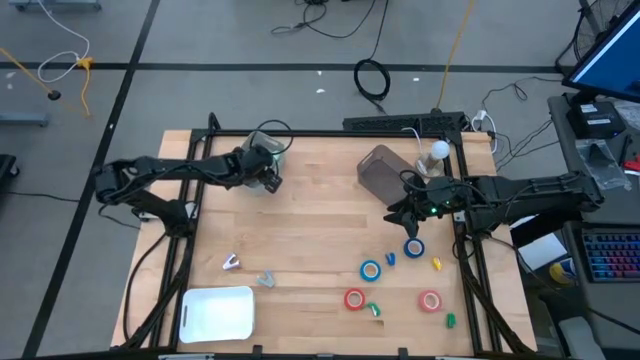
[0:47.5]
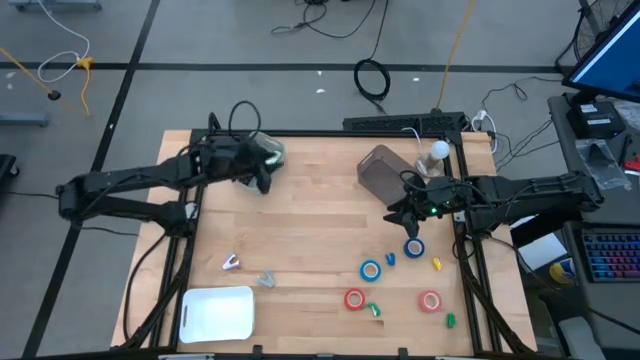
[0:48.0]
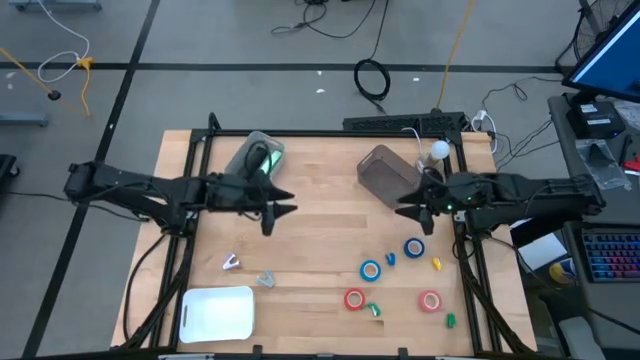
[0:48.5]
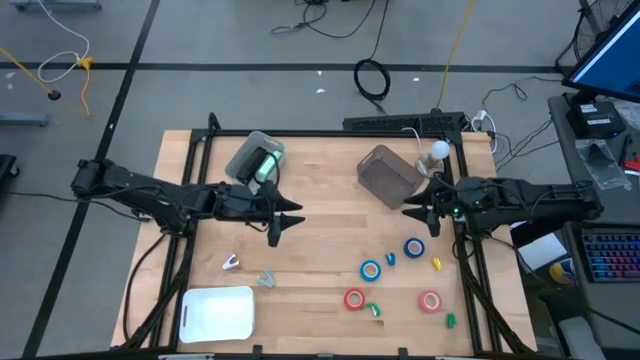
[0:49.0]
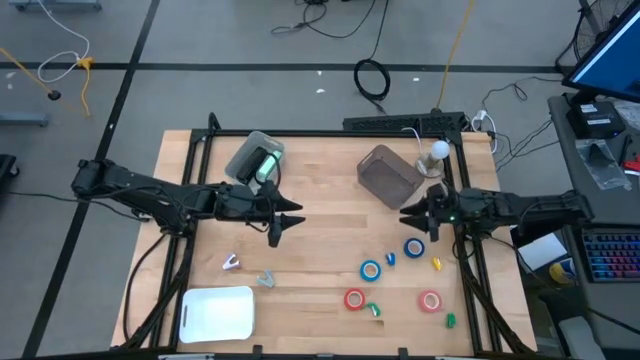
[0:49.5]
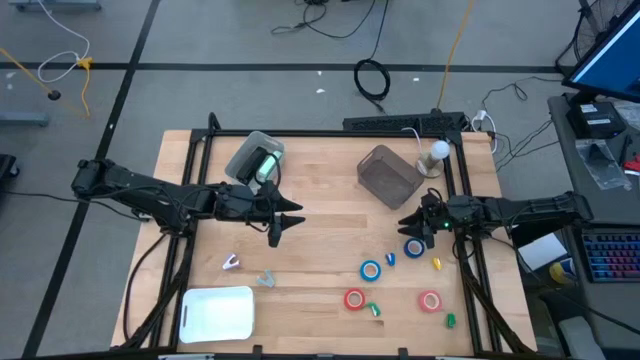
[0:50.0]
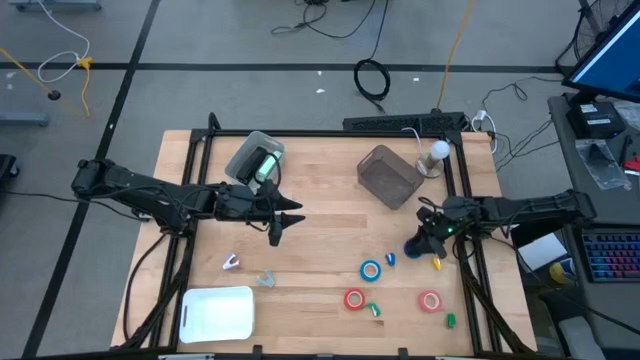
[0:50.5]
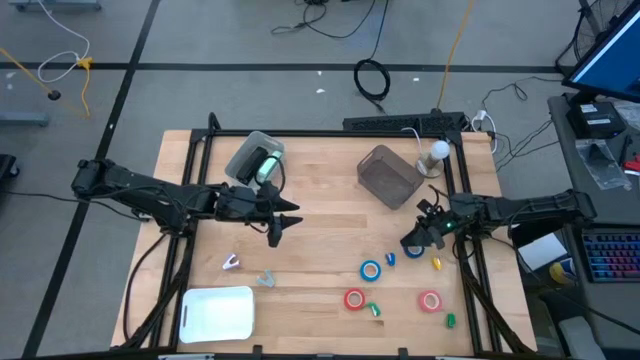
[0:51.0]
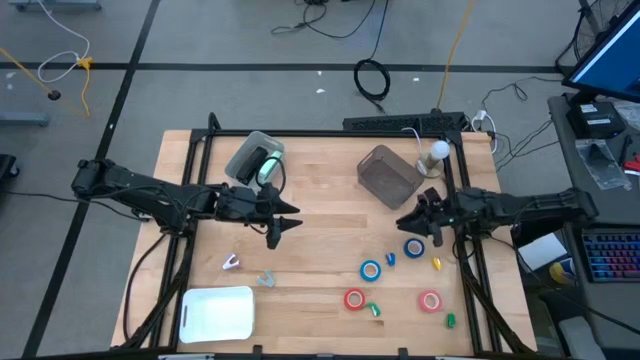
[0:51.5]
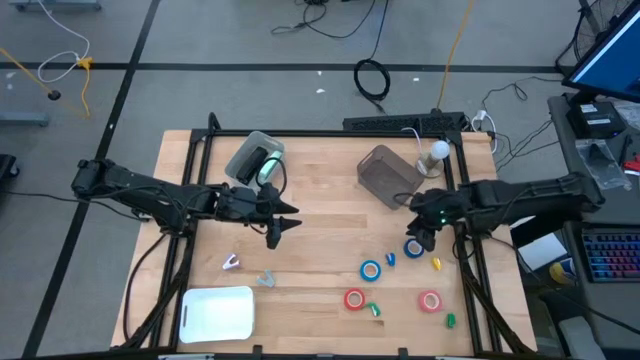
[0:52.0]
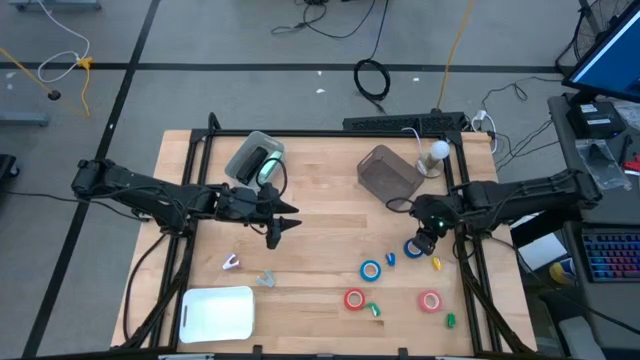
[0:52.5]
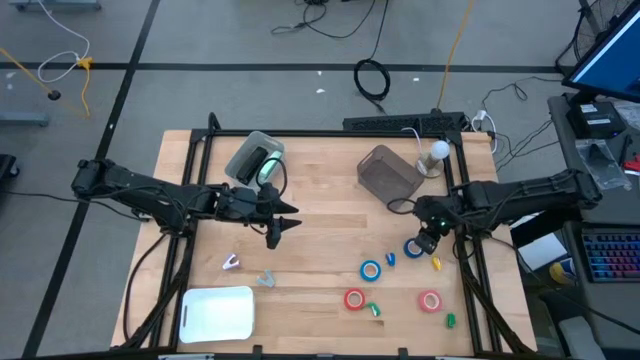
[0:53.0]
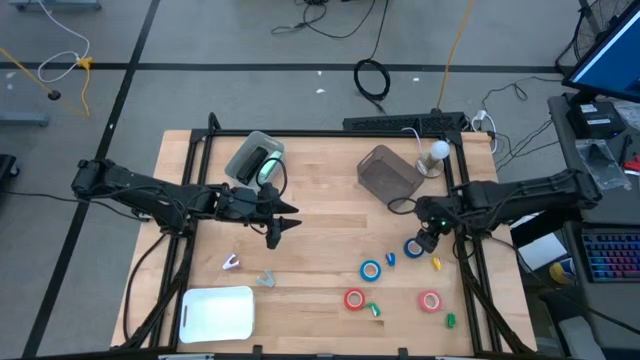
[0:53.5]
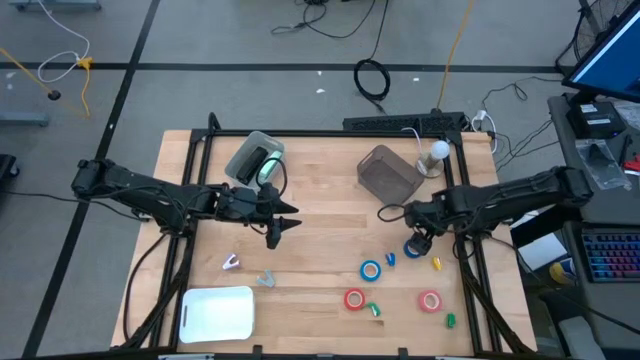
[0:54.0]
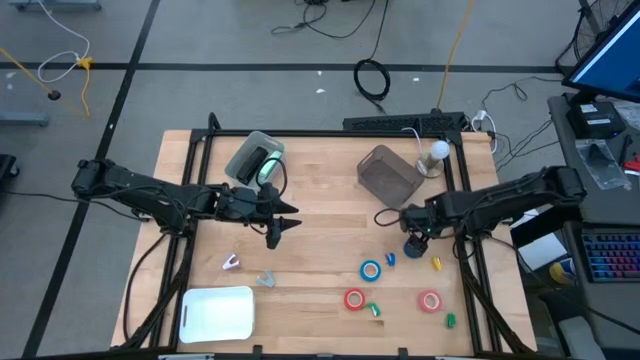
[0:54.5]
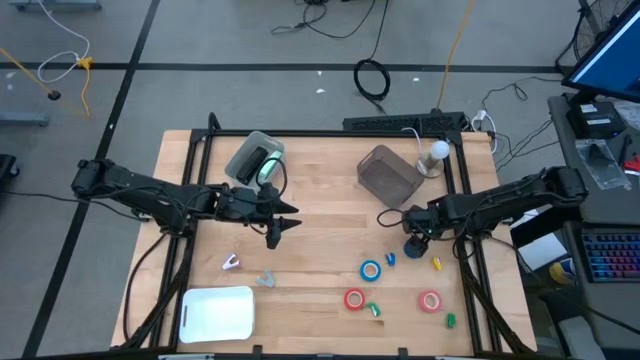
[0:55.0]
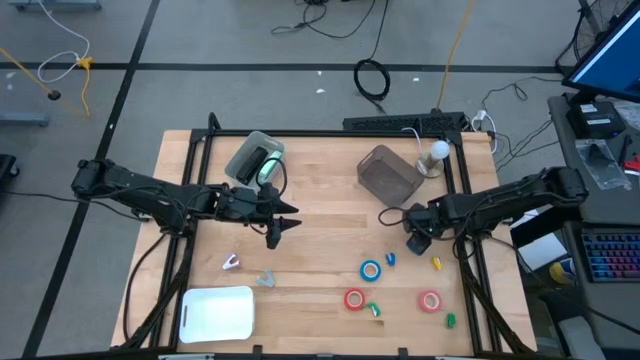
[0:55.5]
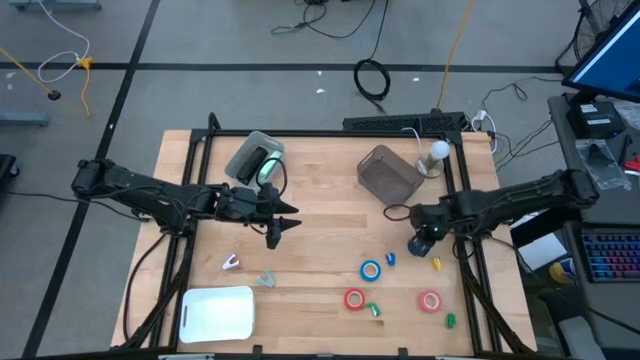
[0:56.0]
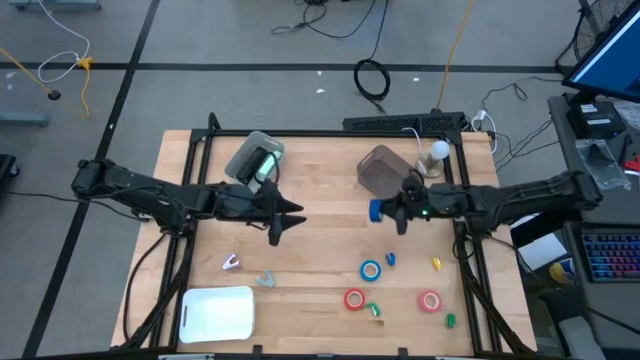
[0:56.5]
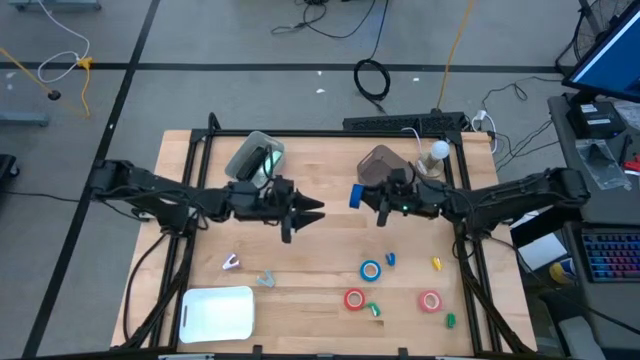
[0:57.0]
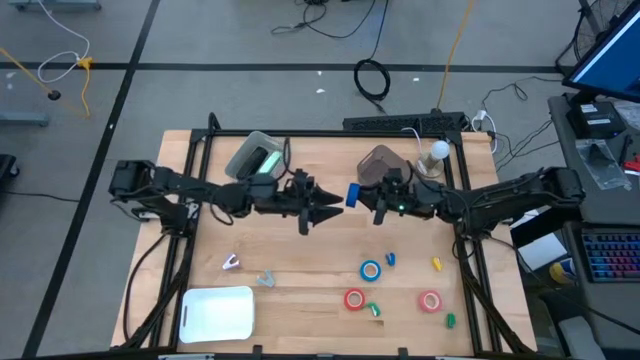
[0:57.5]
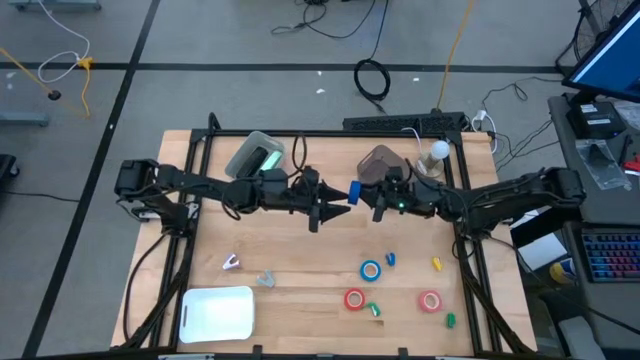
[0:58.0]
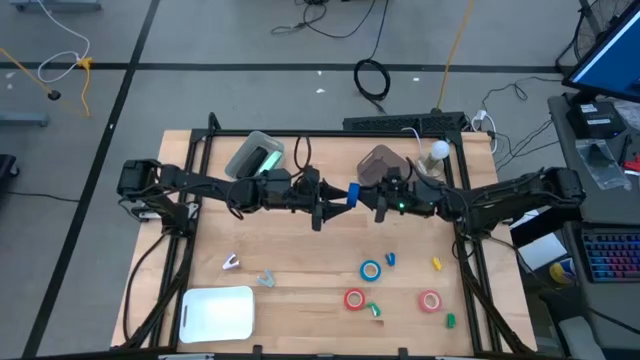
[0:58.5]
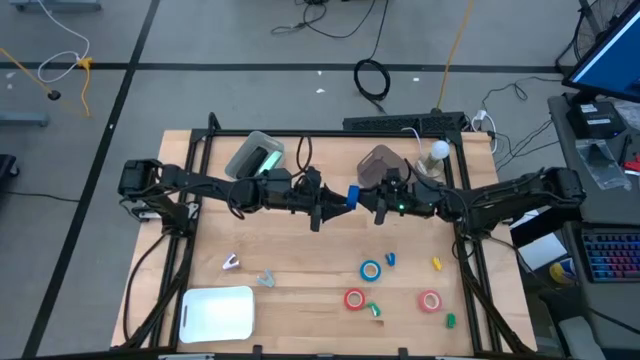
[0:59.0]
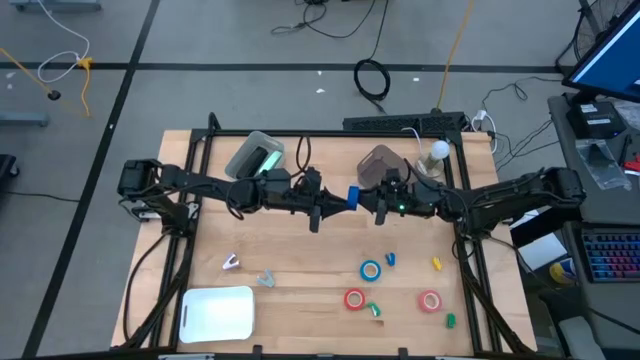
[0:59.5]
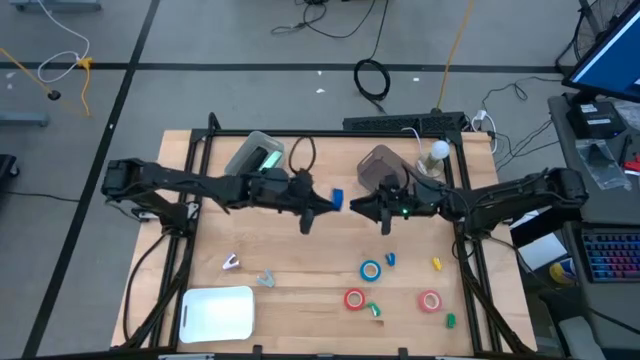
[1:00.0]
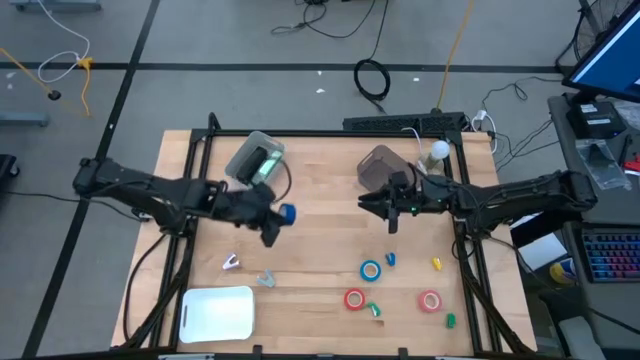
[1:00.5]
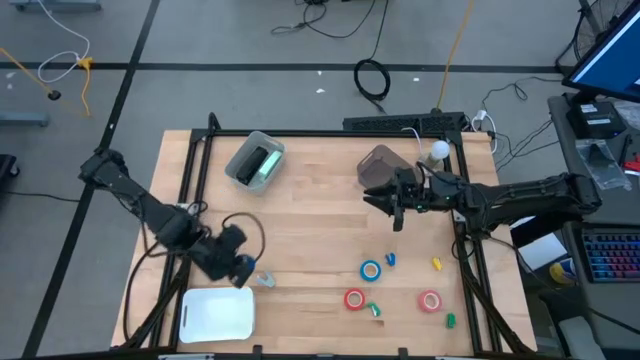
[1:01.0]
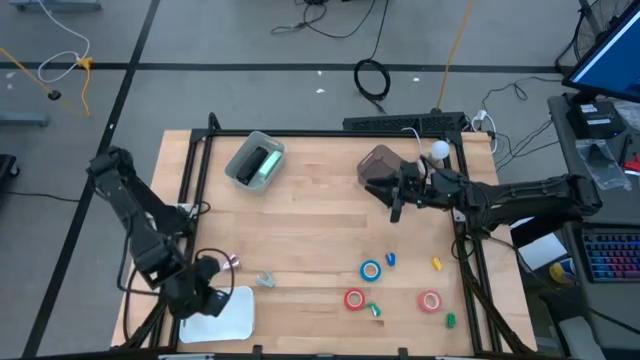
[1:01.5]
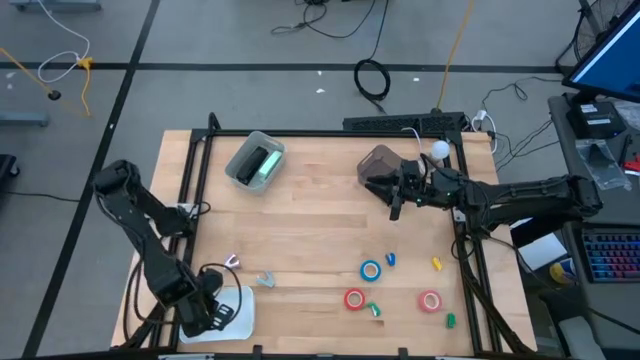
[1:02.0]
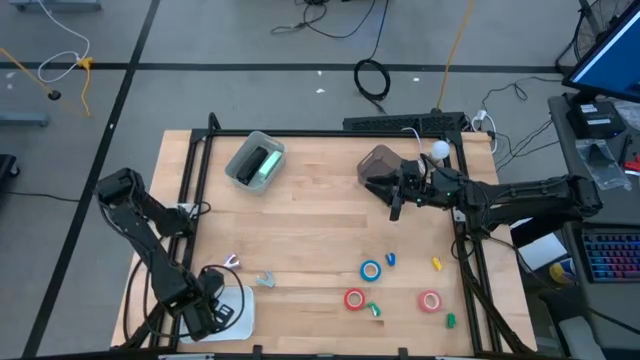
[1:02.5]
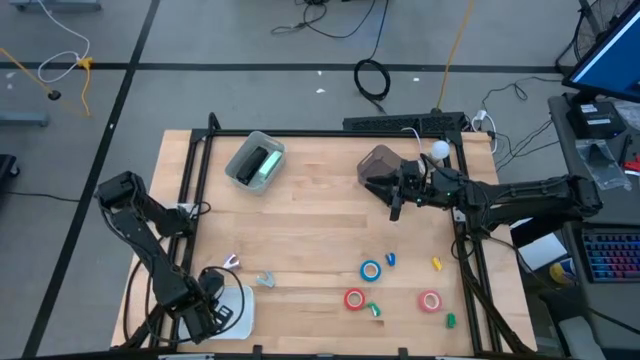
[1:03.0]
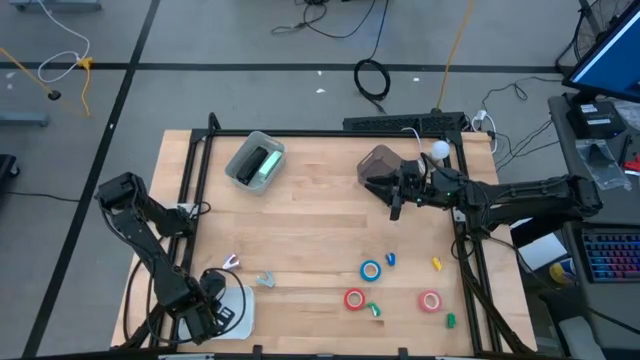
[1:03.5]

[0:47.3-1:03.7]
Task: Pick and place Stapler, Stapler remover, tape
Put the dark blue tape into the white bin

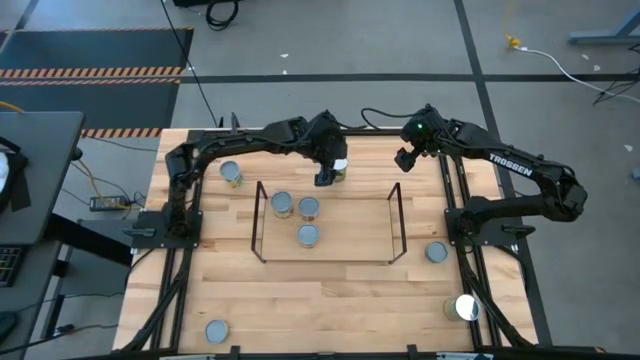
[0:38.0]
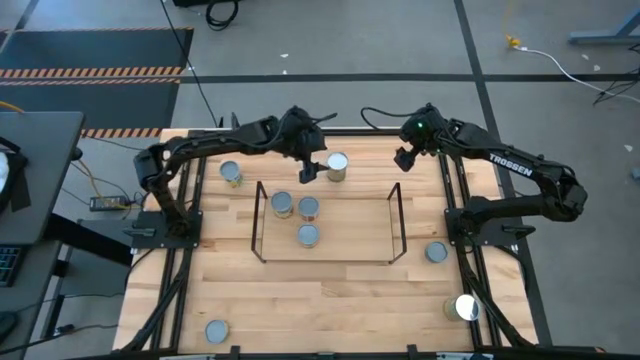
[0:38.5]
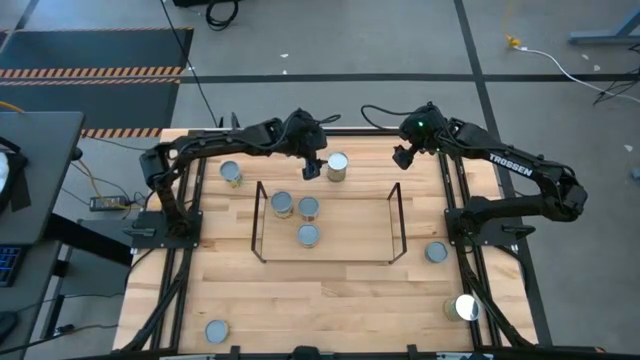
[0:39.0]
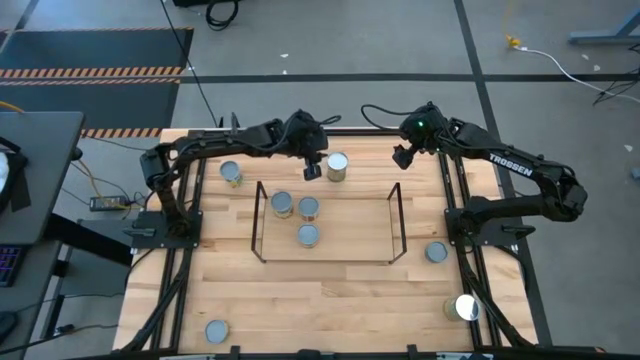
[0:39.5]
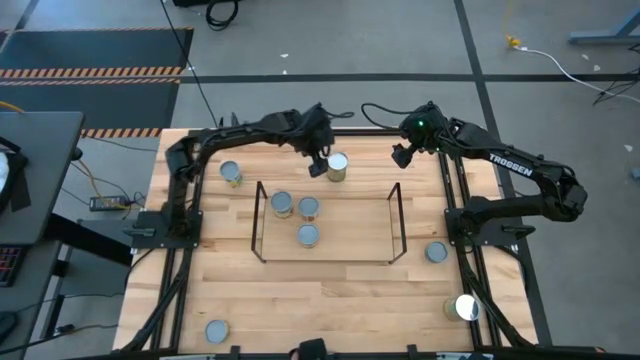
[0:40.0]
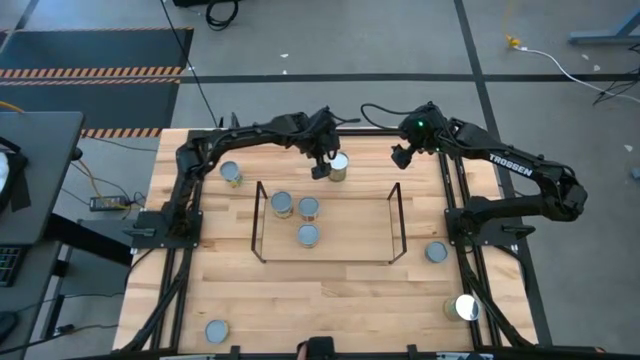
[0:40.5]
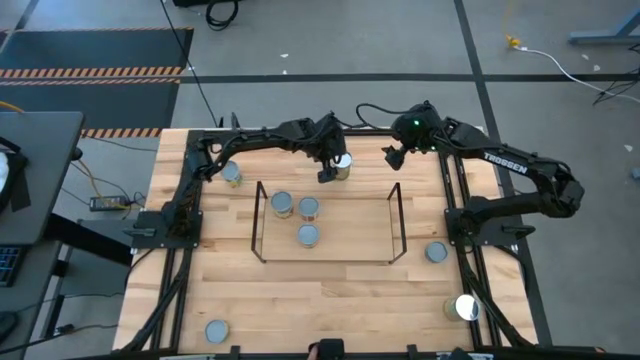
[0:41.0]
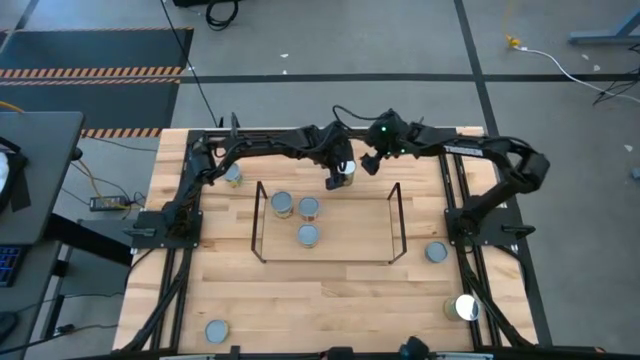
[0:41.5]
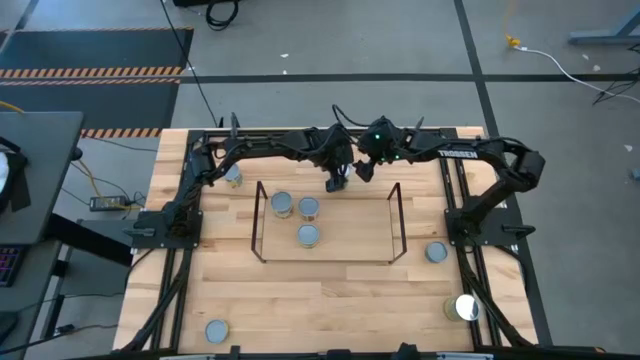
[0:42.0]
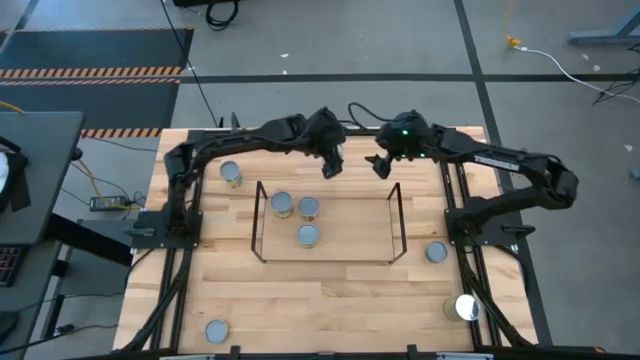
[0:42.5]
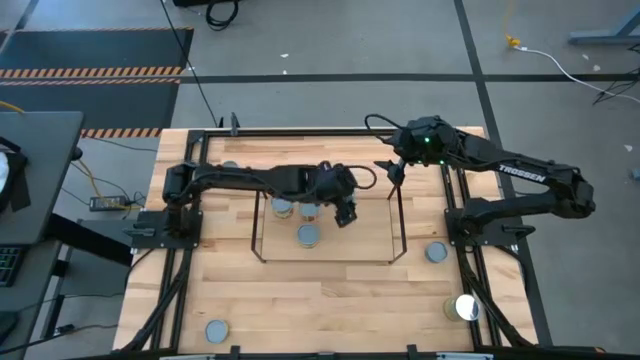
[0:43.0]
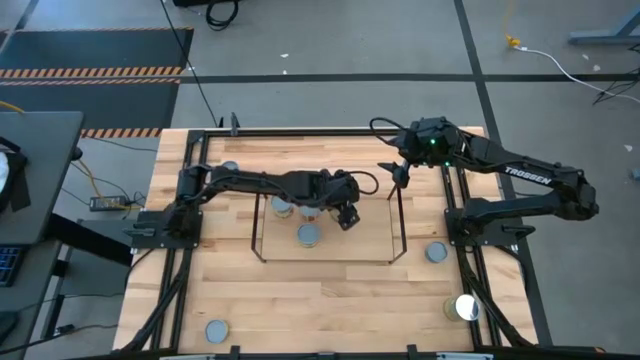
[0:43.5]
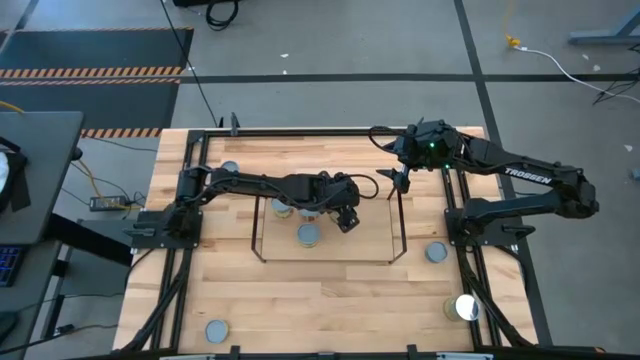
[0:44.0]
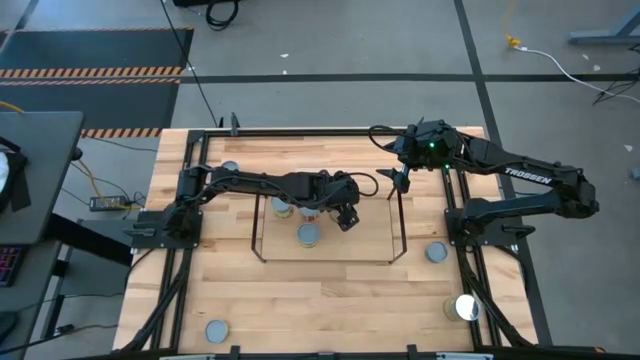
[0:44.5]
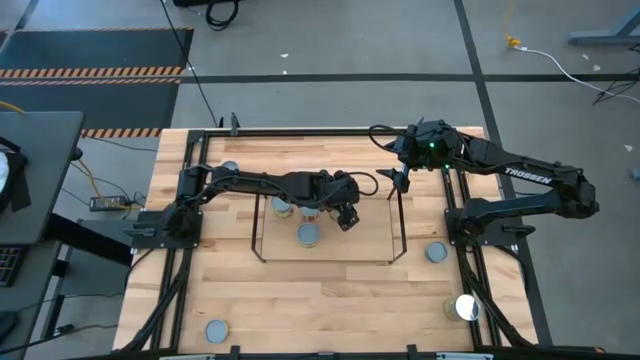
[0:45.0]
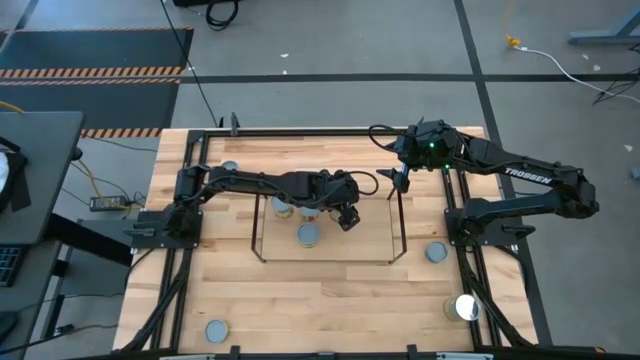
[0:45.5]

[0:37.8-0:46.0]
Task: Pick and place cans onto a shelf
Put the green can on the shelf
